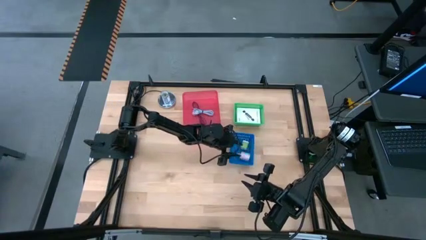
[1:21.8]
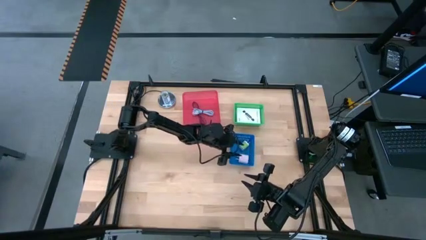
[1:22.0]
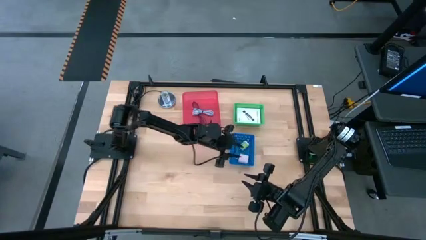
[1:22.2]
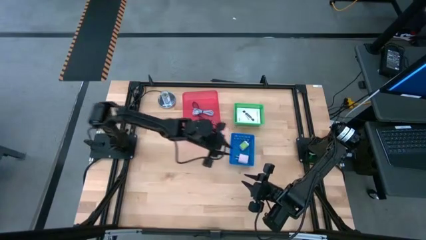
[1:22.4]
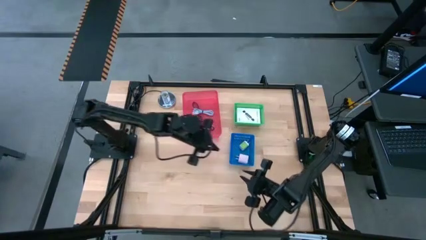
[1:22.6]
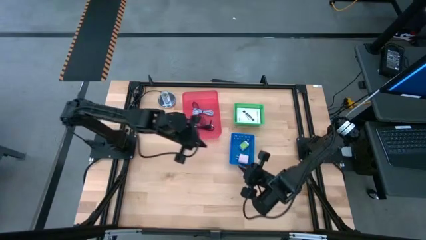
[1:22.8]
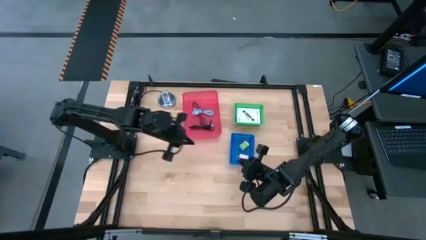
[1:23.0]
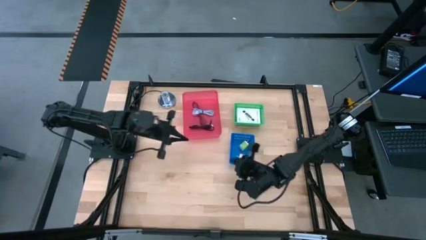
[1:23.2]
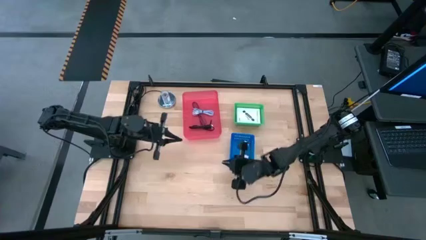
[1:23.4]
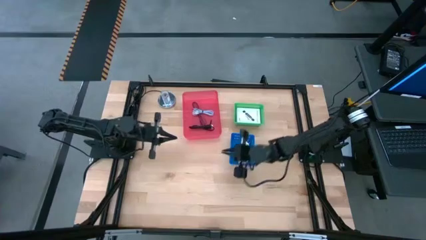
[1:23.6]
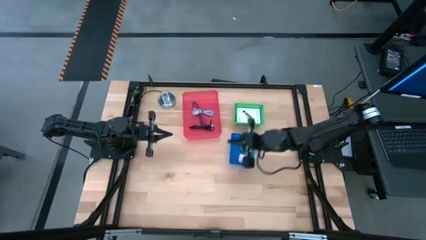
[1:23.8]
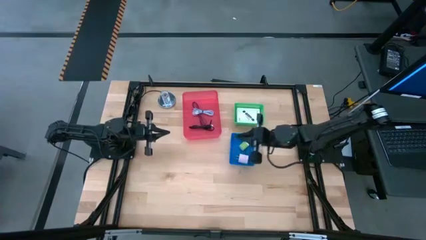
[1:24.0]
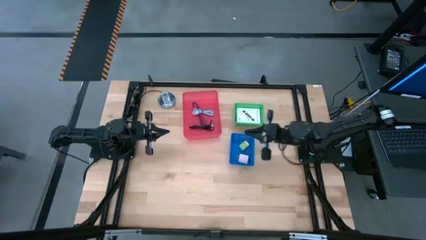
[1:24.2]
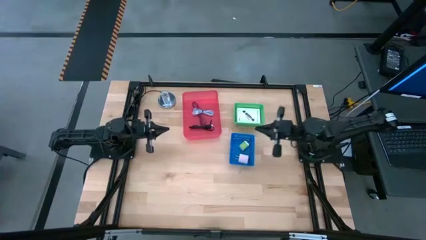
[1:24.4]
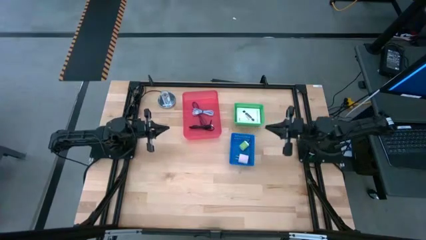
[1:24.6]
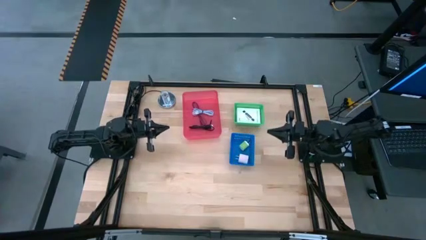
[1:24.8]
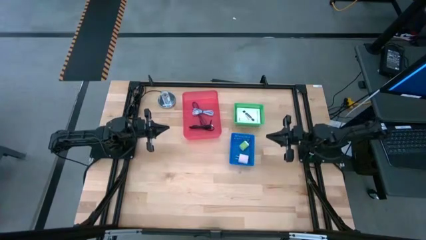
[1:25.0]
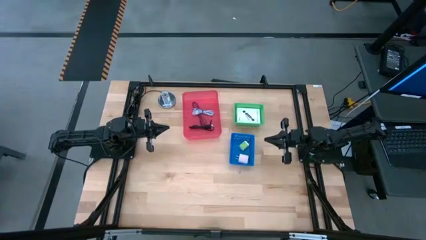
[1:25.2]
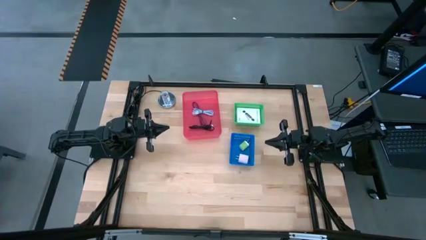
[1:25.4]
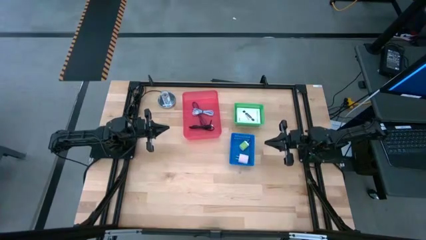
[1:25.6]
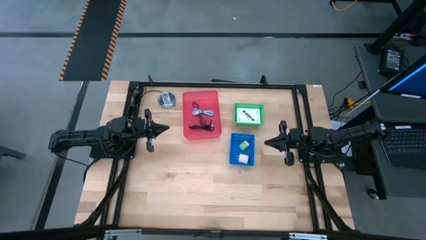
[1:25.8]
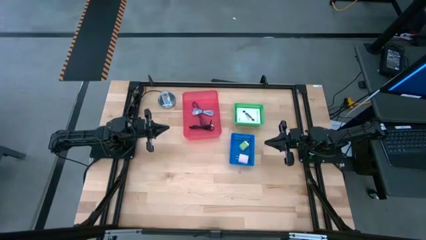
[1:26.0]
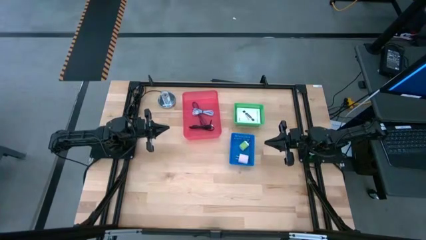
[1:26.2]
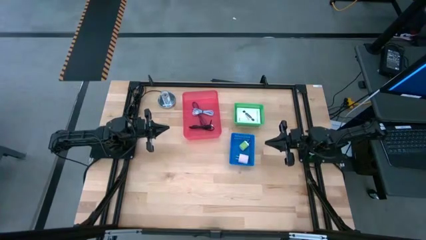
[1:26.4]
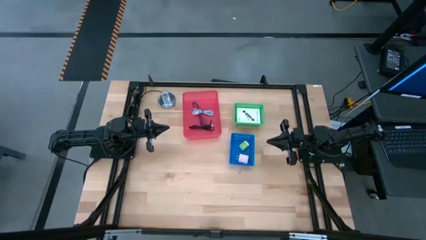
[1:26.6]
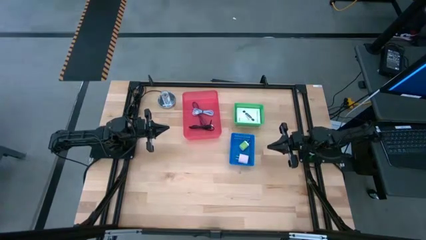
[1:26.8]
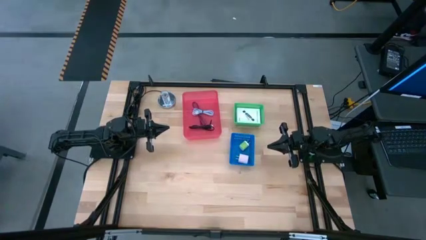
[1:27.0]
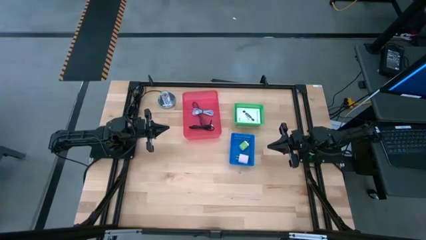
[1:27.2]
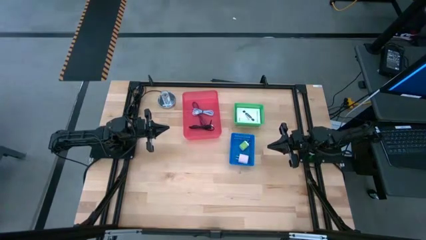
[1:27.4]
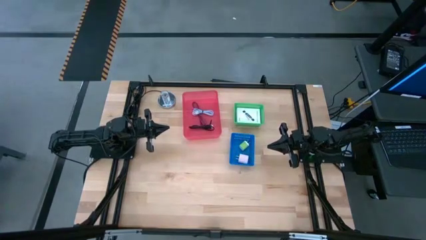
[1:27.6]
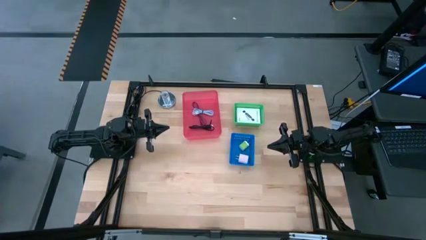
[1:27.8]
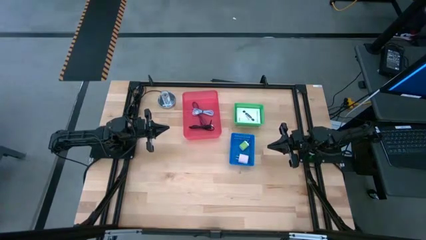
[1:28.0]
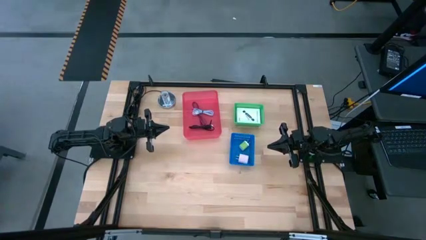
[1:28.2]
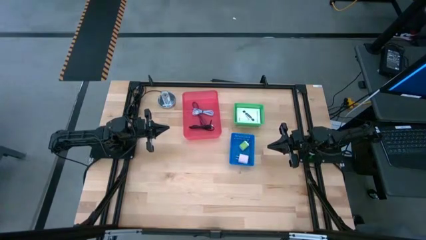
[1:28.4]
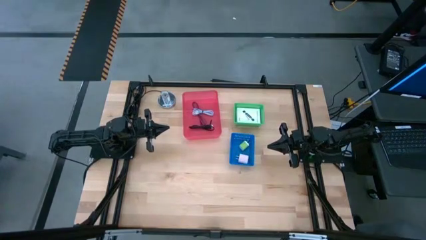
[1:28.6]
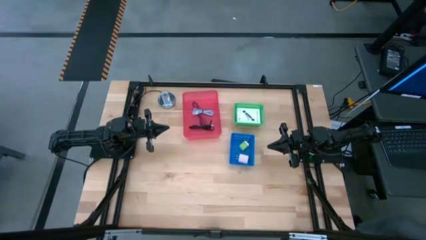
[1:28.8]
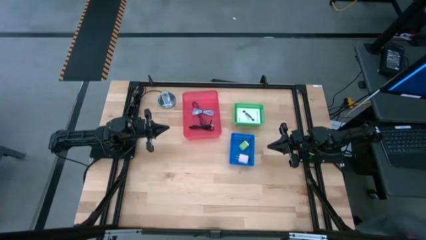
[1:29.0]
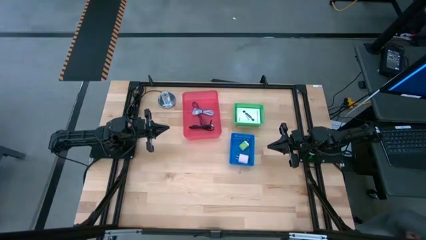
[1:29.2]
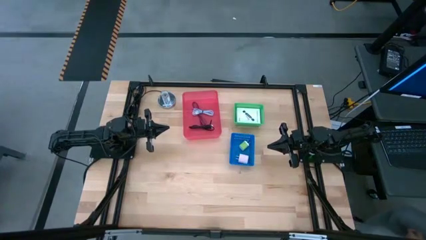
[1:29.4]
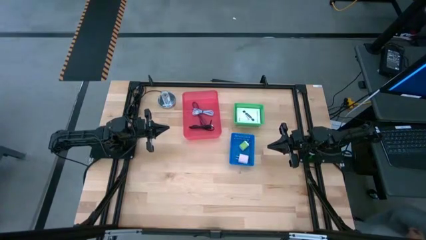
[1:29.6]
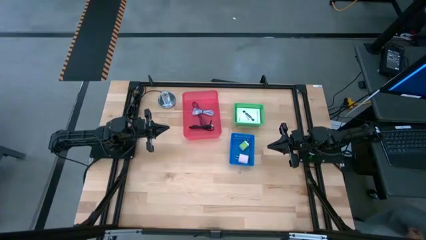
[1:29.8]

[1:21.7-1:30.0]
Task: Pick and place items into bin
Return to Home Position

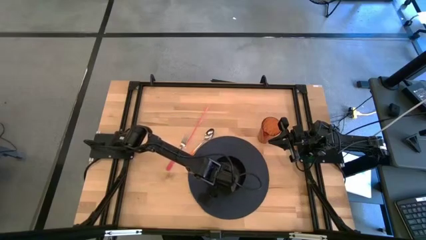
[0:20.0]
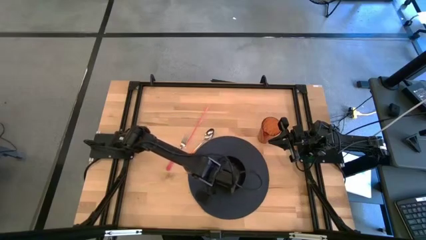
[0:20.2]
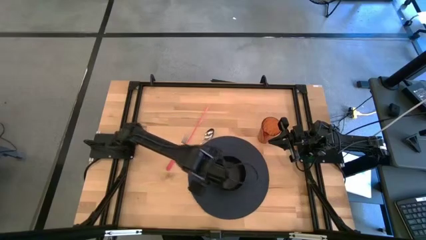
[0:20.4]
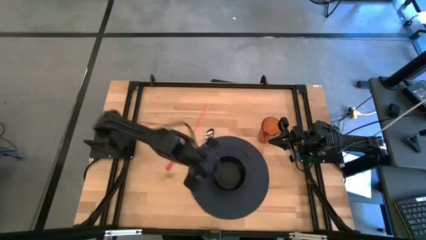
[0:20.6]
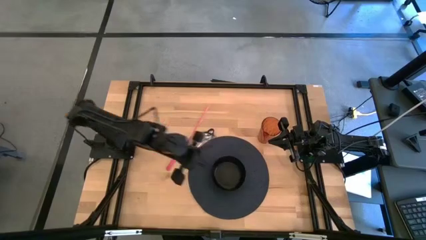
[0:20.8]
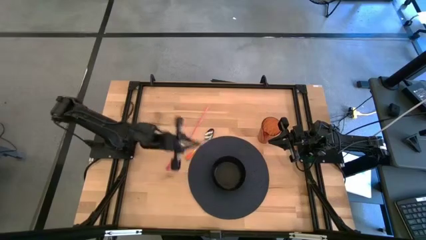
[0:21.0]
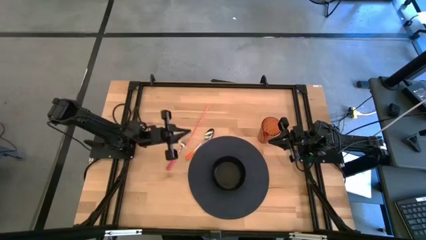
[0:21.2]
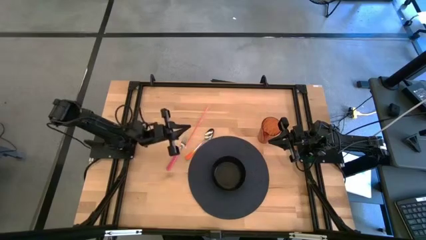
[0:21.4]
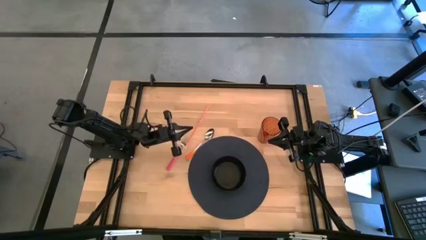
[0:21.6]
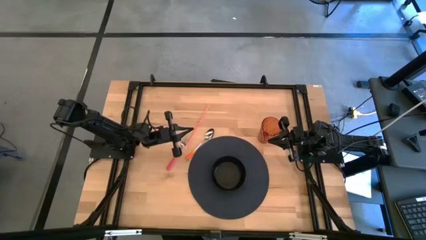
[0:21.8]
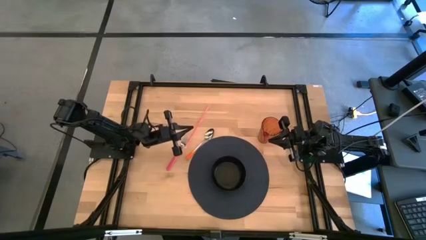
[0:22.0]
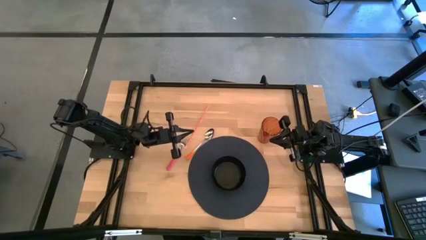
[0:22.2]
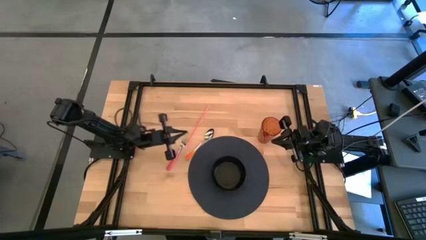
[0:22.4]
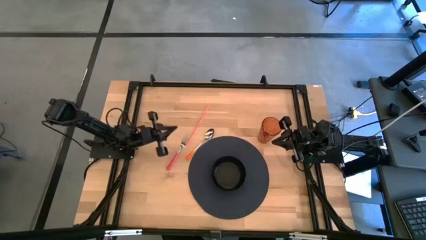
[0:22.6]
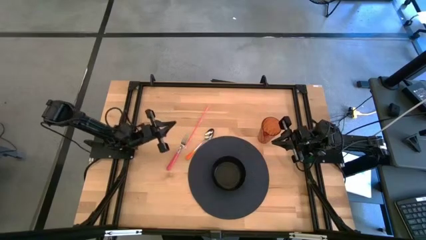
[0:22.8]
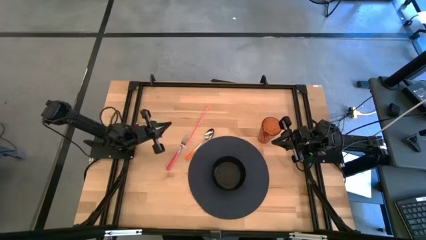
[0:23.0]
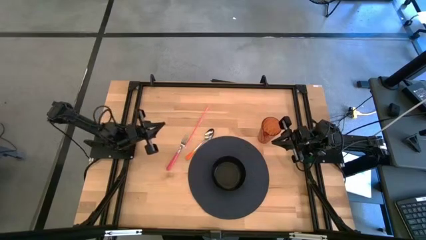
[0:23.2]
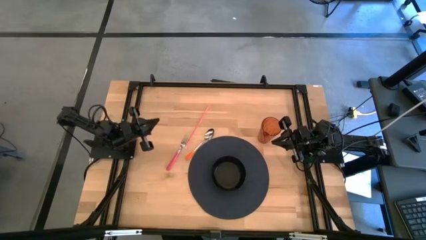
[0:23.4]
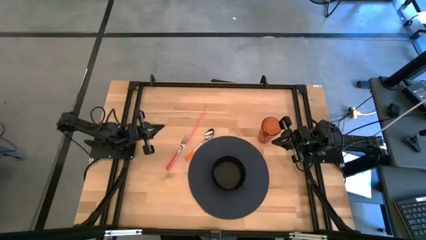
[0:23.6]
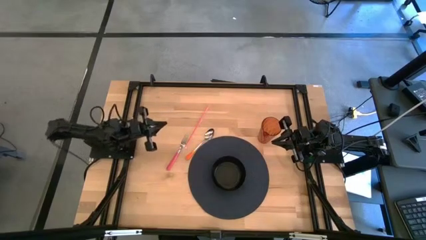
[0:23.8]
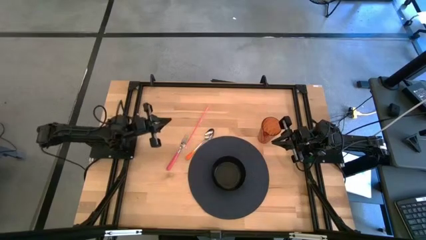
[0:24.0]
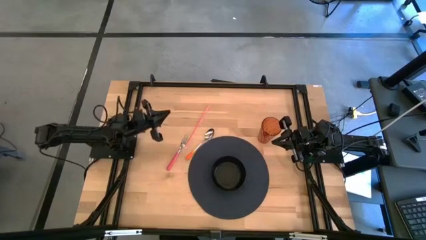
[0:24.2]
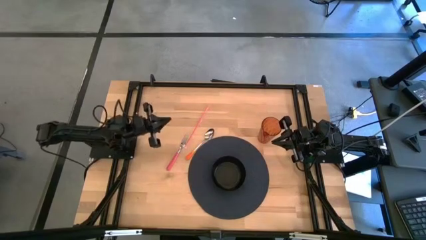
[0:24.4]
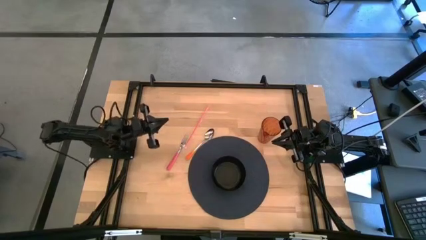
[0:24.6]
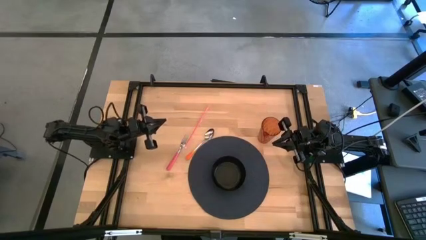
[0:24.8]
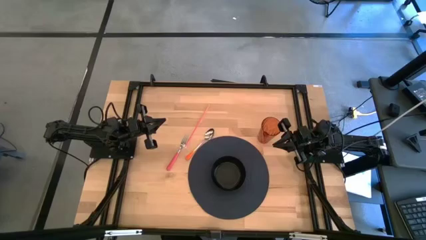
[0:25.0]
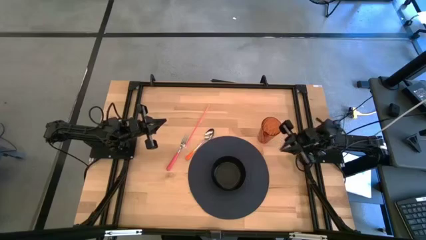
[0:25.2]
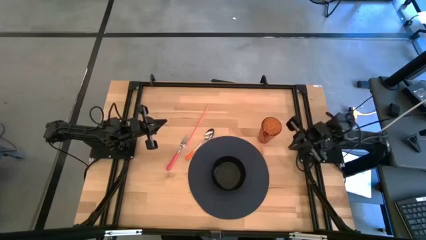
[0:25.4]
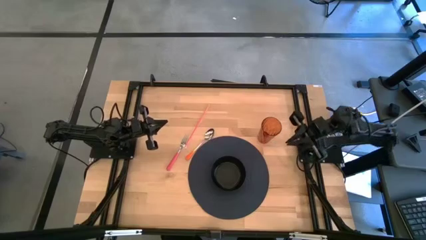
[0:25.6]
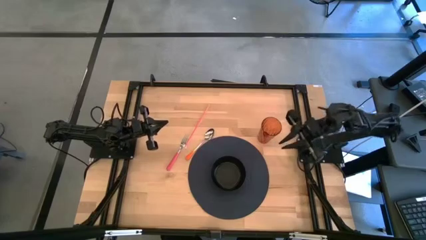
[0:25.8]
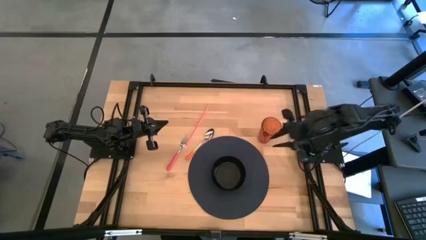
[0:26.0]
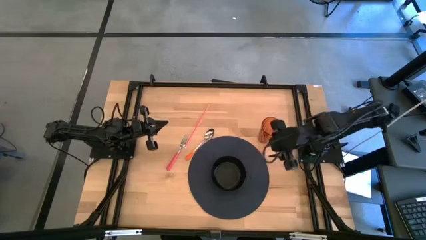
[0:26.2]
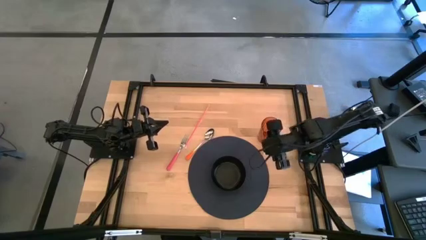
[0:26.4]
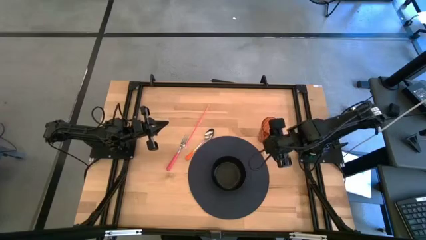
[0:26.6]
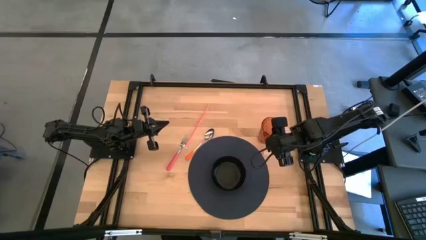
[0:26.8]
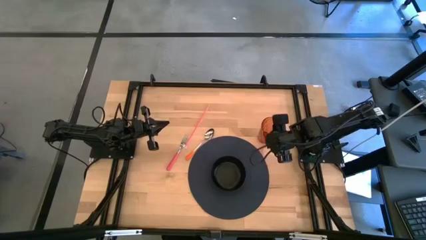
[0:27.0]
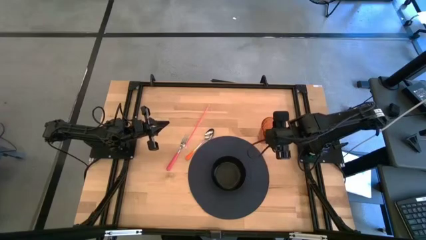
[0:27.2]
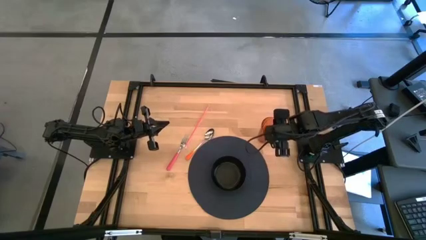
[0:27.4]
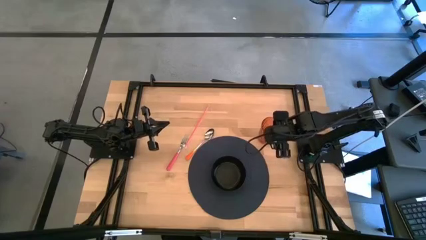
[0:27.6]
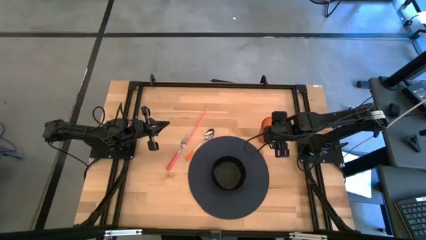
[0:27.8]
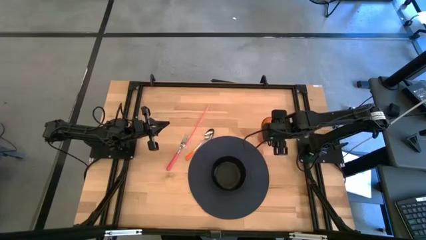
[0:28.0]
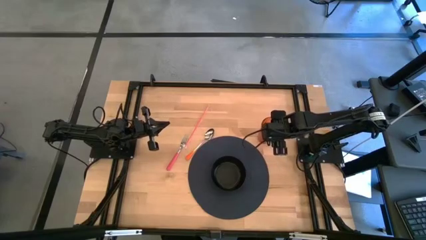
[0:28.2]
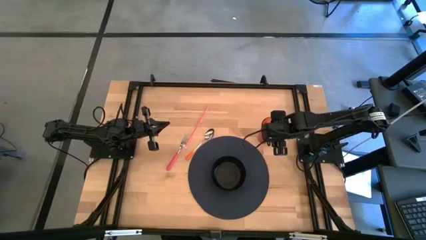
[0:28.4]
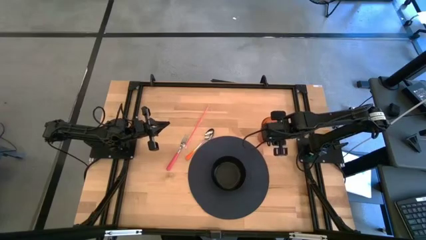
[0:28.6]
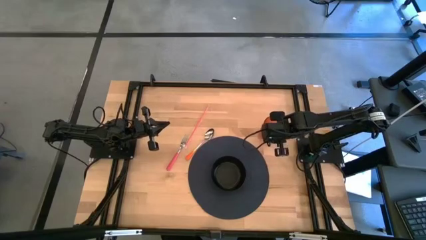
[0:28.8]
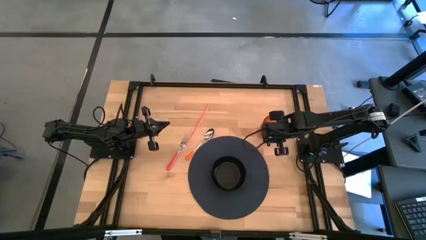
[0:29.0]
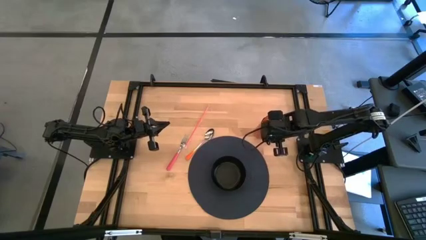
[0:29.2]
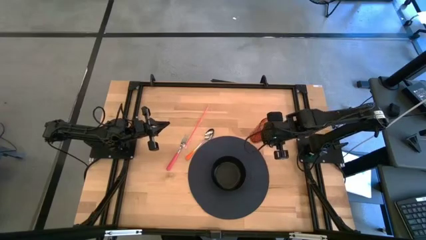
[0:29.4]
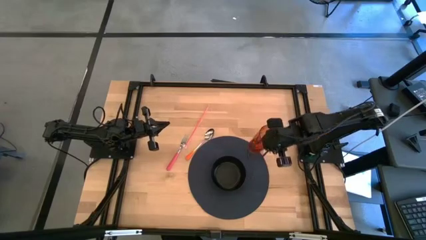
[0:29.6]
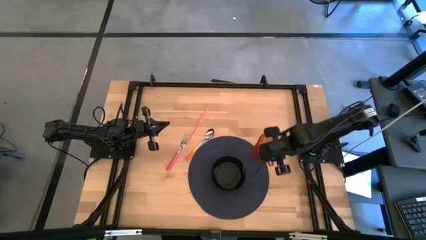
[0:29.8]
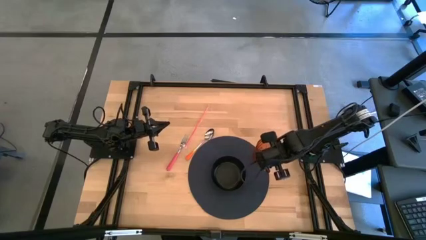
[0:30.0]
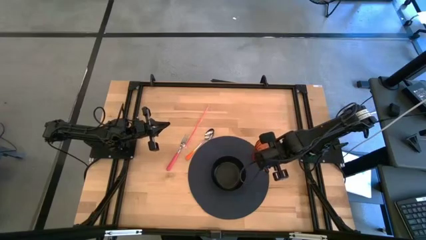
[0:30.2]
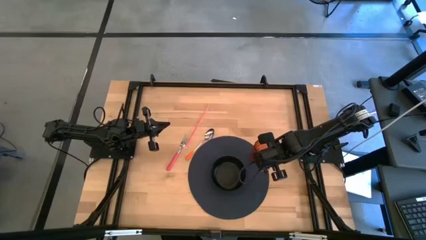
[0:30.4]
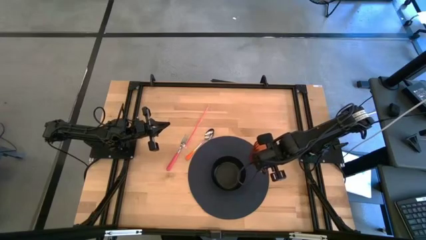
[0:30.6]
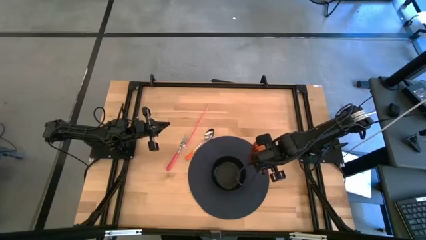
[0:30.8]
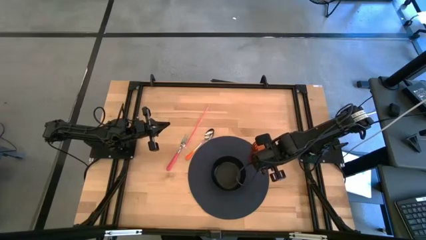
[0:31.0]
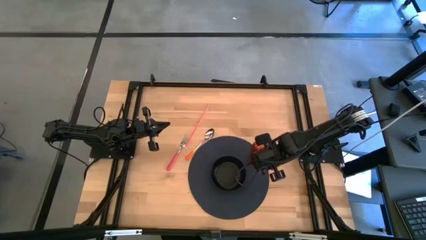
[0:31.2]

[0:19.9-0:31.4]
Task: Pick & Place Utensil
Put the brown cup on the top right side of the black bowl
